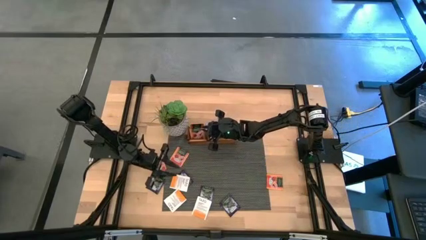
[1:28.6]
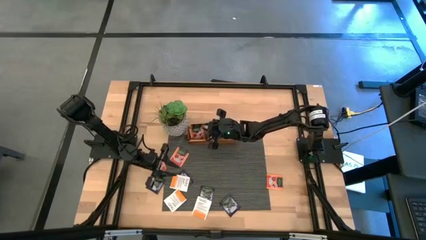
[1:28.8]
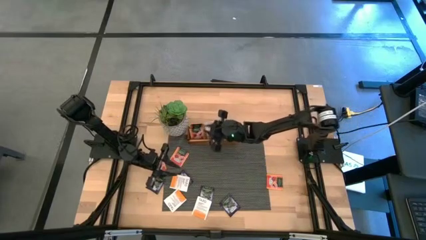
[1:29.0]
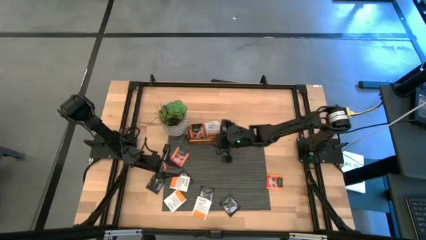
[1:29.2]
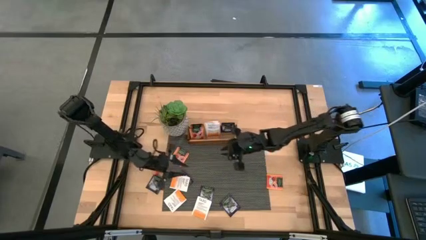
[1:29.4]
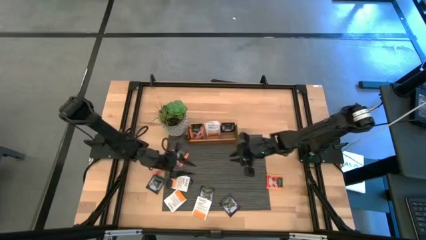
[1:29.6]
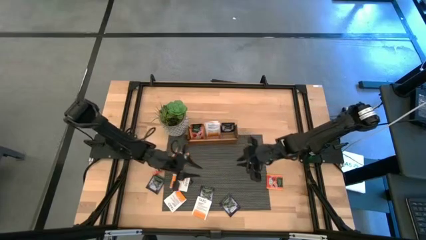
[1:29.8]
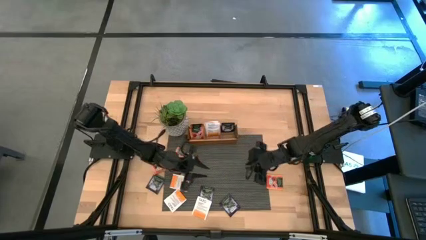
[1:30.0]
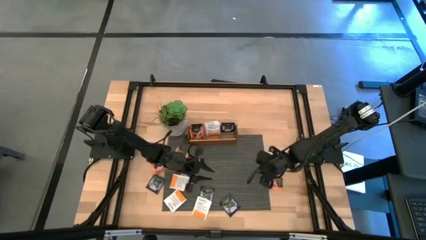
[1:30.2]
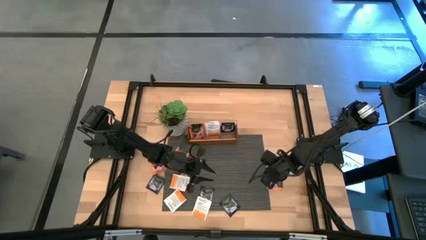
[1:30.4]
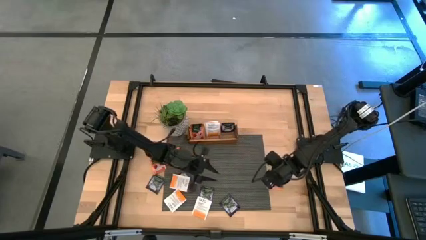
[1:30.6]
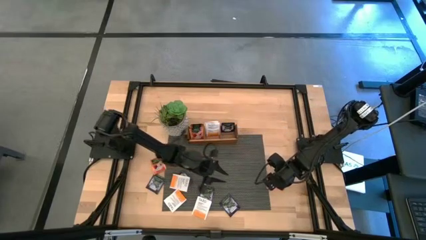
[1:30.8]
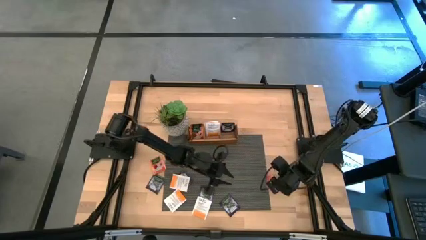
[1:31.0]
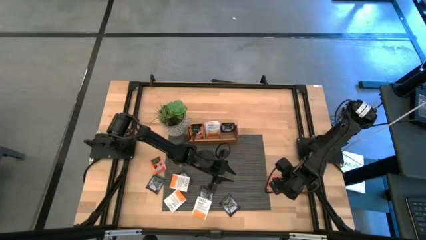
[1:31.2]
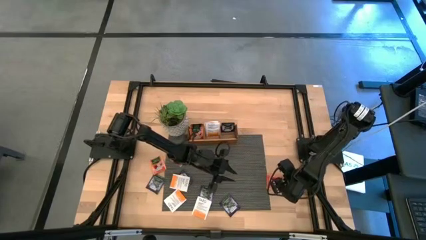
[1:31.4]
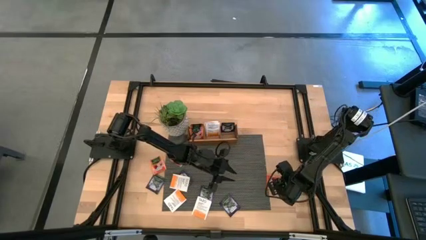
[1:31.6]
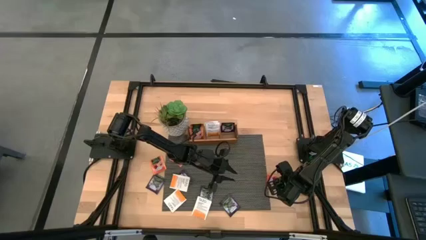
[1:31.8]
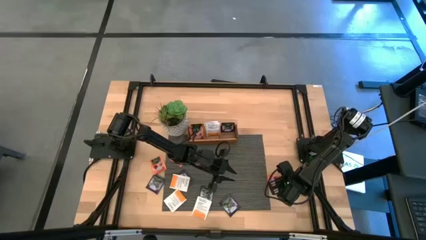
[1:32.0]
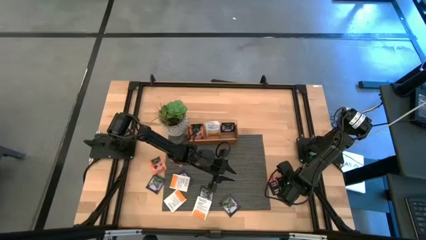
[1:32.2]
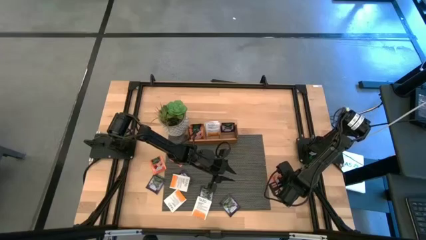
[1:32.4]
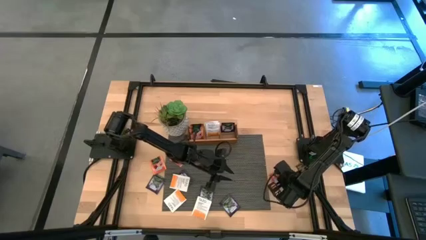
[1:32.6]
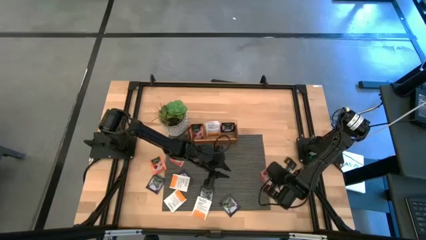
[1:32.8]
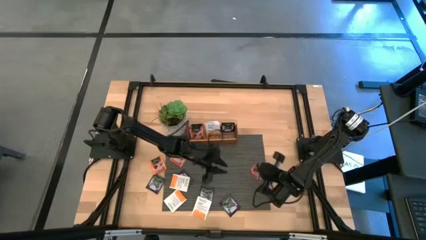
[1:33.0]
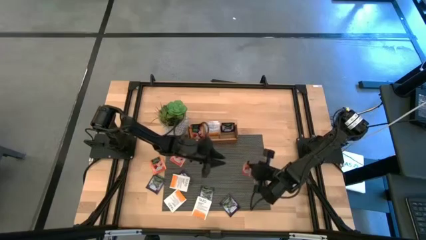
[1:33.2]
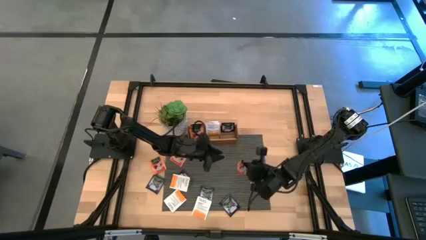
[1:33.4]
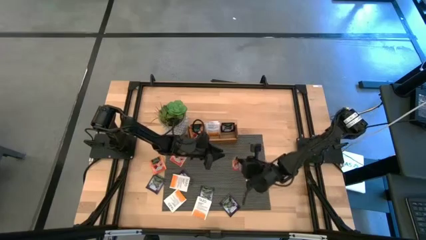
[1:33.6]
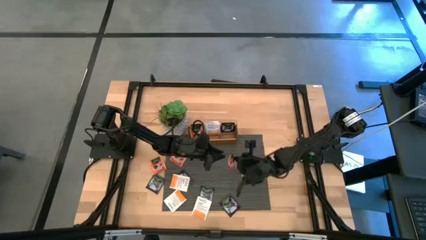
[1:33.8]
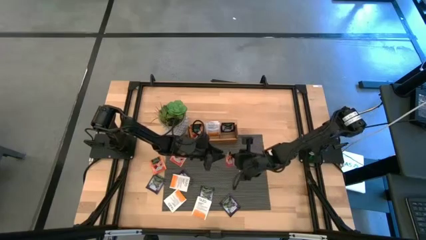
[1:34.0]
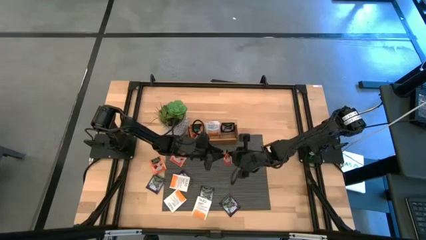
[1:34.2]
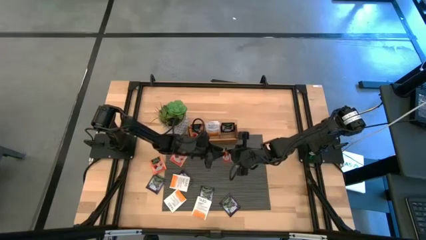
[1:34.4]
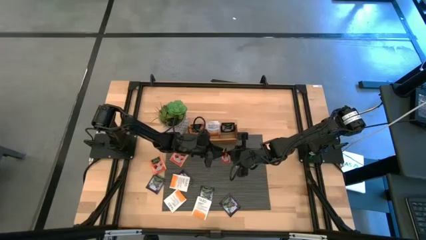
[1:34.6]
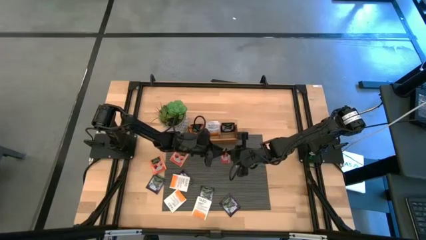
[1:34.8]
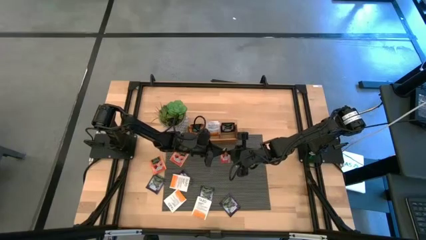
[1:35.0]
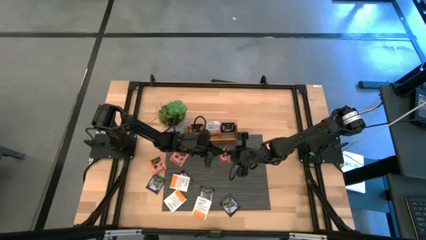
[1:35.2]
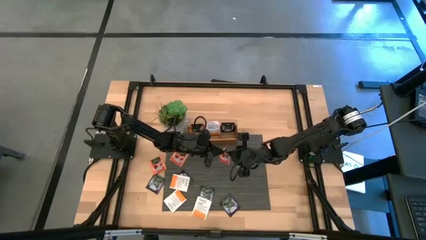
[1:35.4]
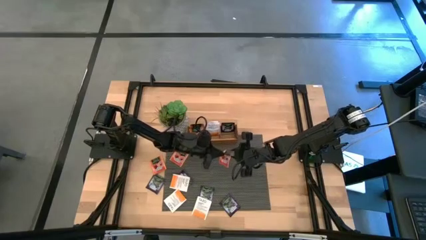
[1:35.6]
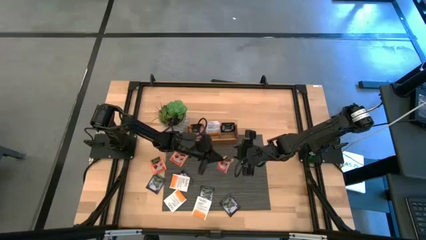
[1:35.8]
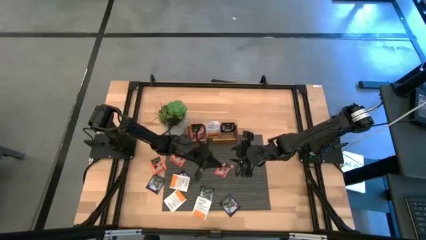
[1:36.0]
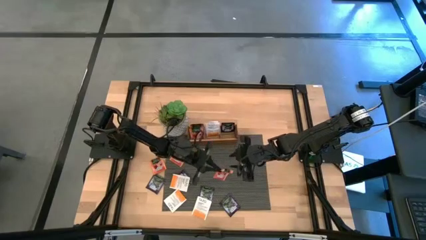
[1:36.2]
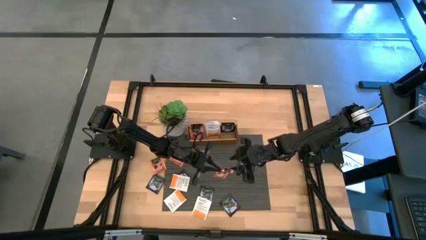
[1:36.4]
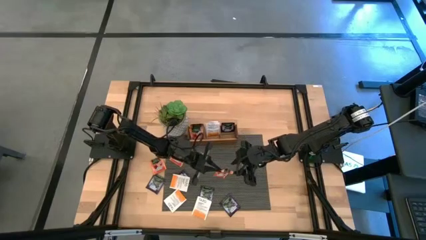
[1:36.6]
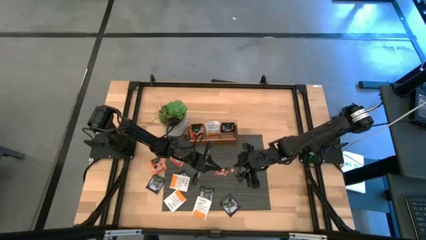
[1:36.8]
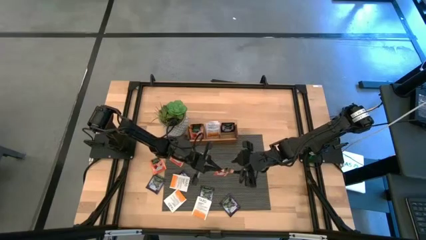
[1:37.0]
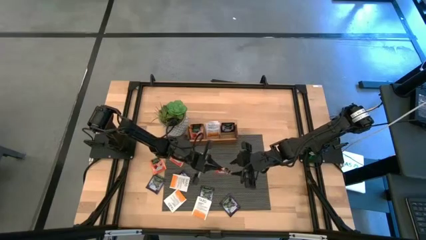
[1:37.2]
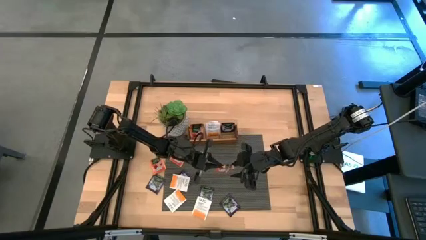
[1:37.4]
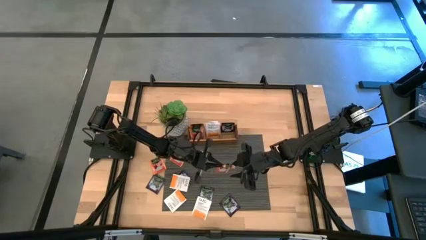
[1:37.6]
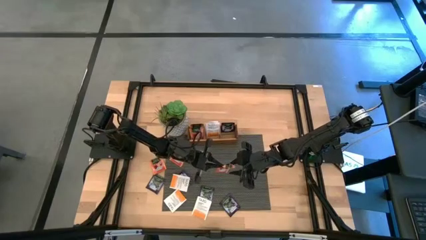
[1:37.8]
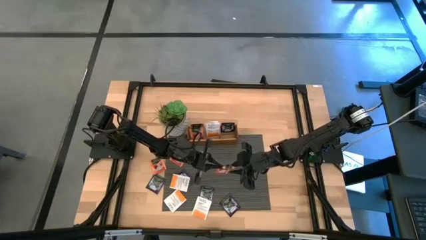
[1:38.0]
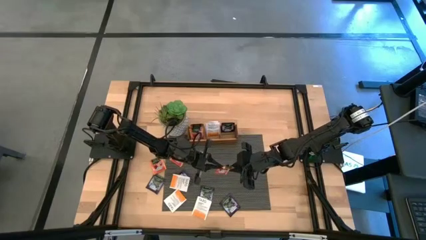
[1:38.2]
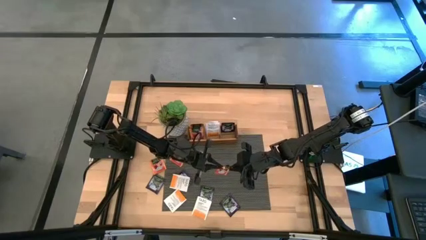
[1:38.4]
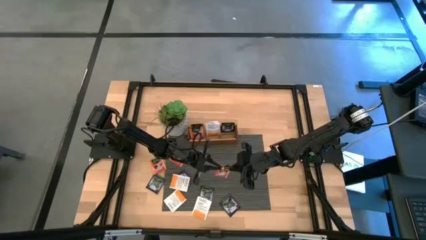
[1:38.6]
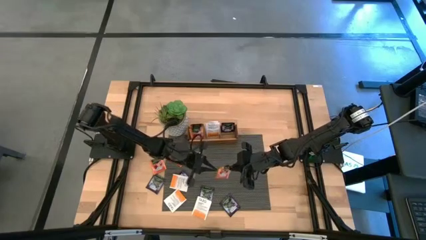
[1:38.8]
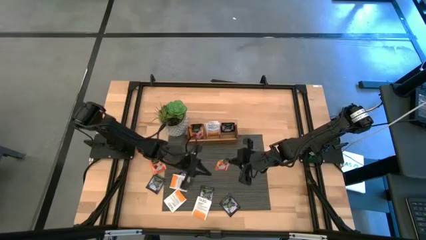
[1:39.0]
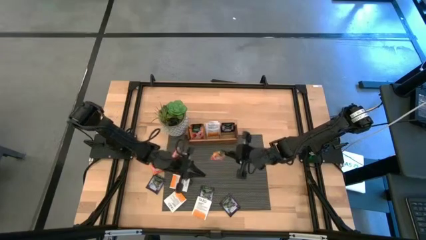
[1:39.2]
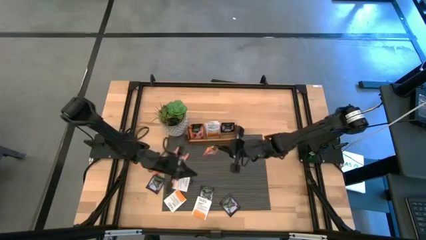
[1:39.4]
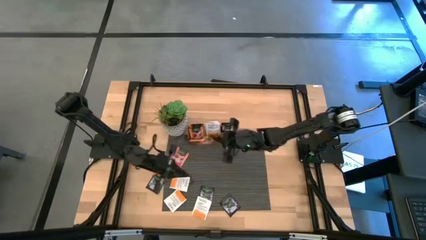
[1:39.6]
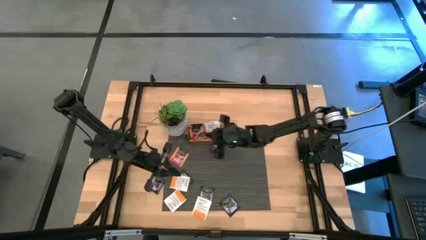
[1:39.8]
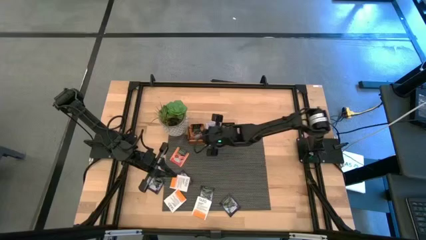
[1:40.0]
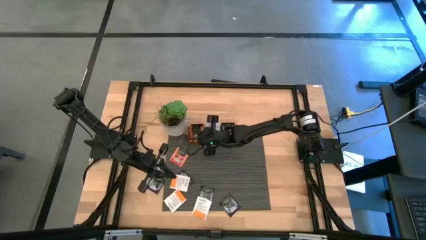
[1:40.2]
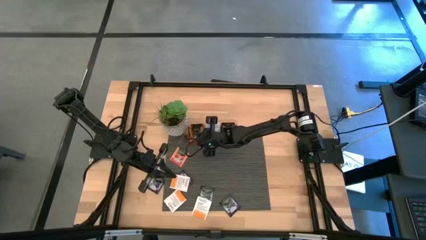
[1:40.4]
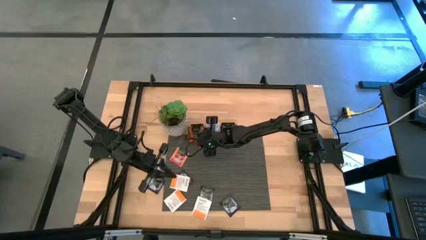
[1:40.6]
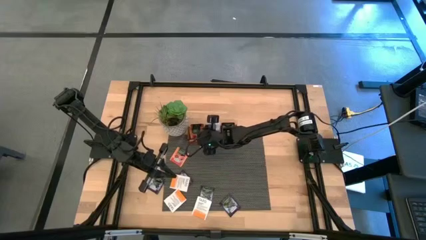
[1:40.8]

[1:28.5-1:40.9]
Task: Pick & Place Tea
Put the right orange tea bag into the left slot of the wooden organizer

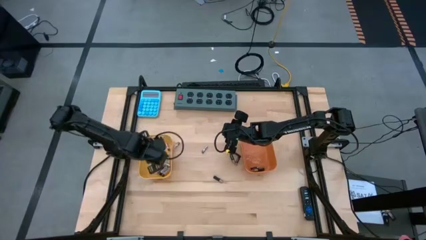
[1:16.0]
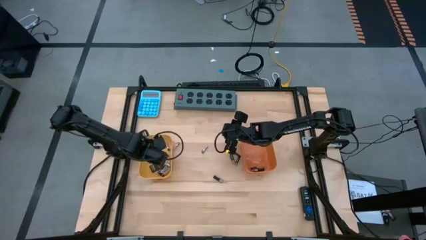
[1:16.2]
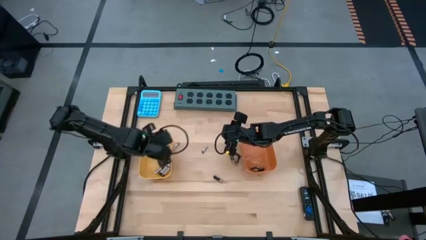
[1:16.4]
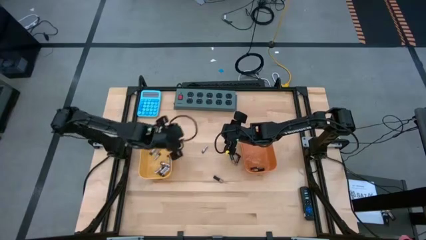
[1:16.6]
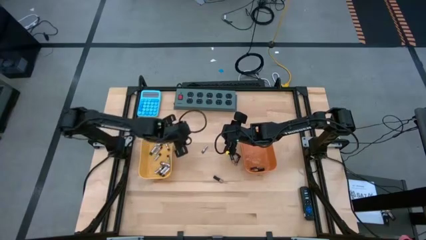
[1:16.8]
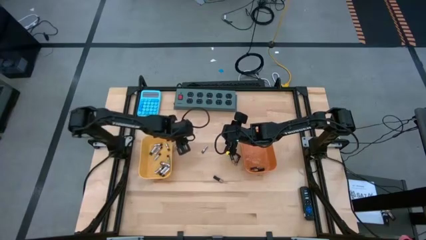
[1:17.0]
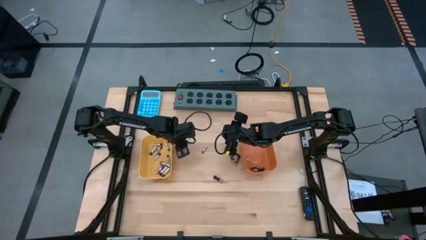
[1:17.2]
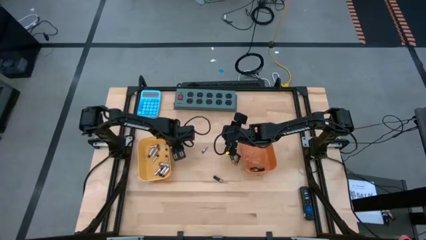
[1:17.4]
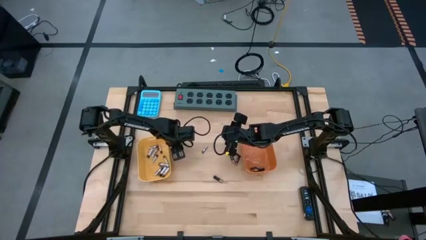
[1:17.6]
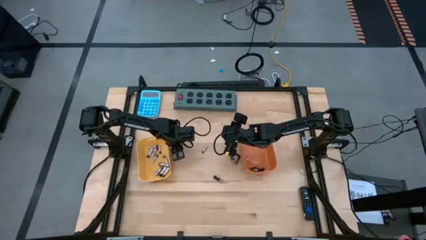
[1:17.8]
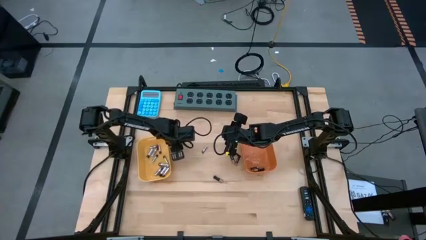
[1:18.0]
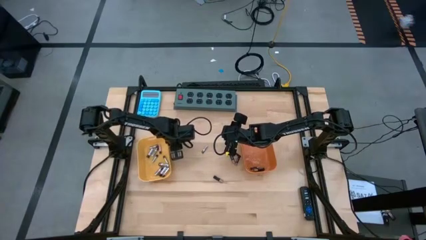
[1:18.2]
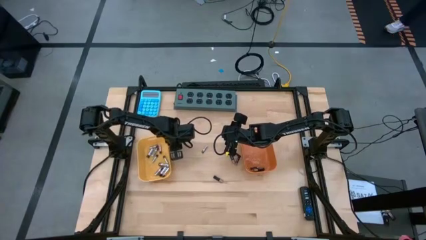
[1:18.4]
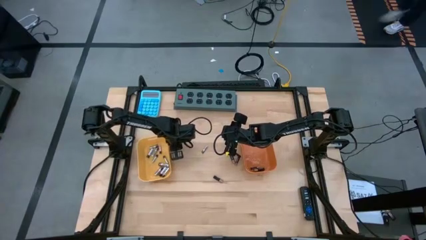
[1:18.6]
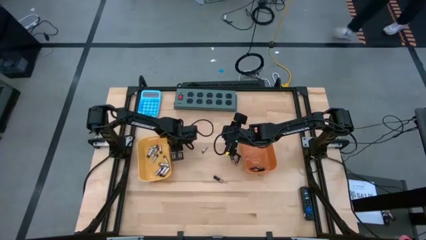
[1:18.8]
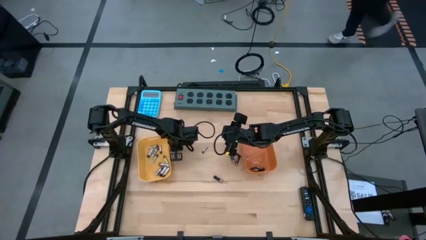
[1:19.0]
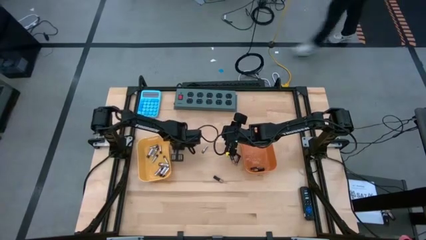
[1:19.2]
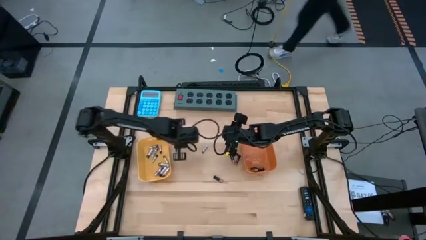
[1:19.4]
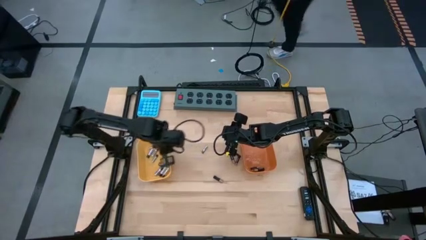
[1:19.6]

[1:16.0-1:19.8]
Task: Sort batteries
Put the silver battery into the yellow bin

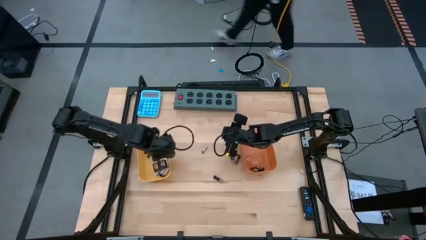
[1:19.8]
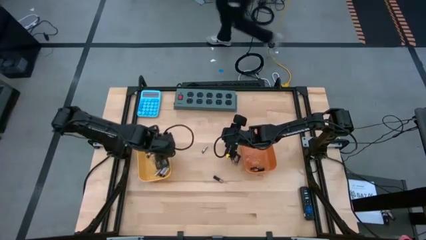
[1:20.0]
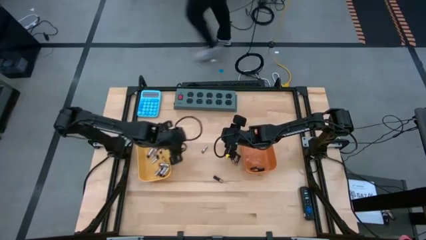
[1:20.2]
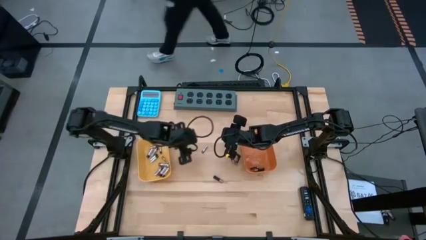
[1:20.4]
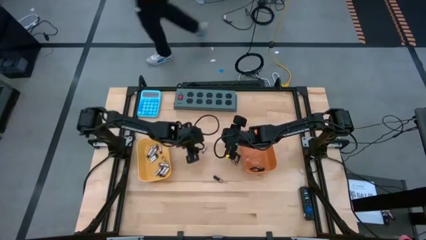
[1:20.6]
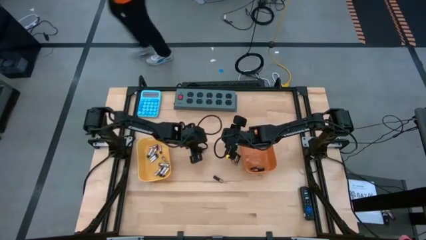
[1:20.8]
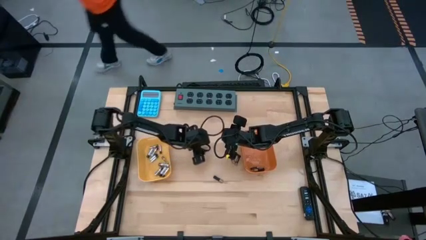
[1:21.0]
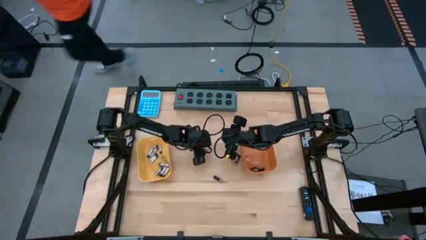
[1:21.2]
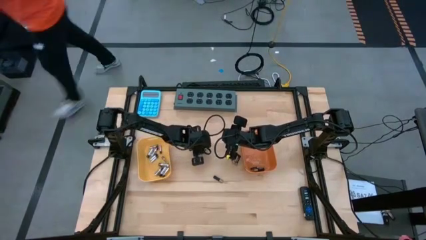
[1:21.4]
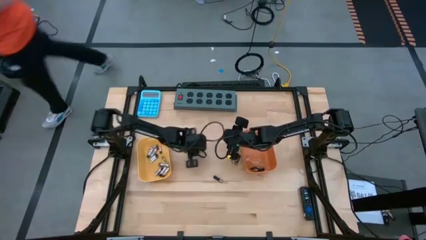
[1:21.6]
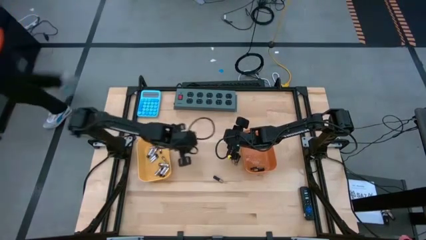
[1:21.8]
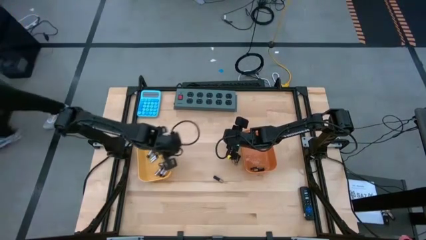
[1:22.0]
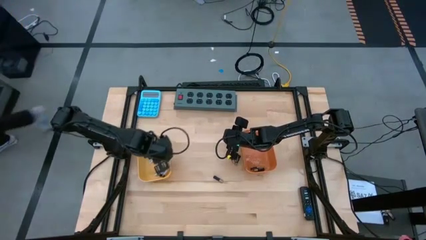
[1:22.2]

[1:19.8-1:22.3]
Put the silver battery into the yellow bin
